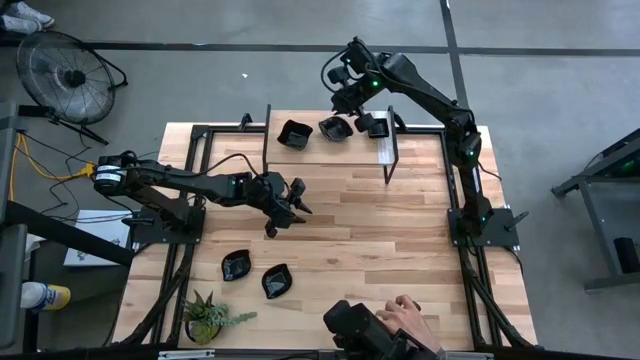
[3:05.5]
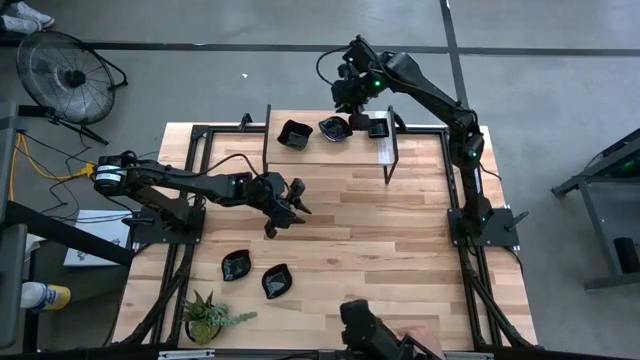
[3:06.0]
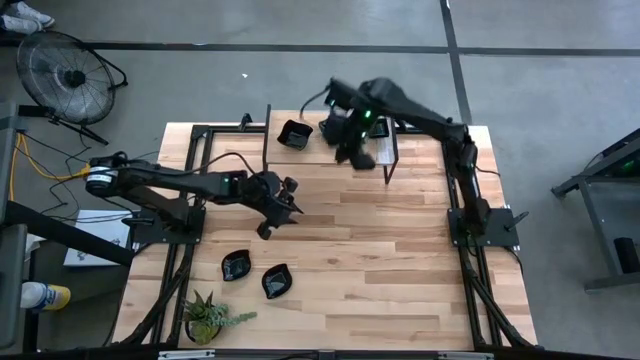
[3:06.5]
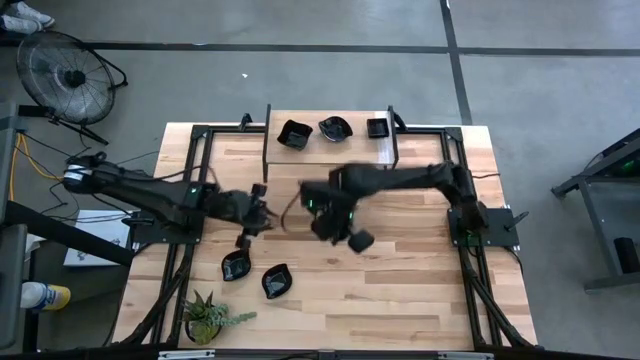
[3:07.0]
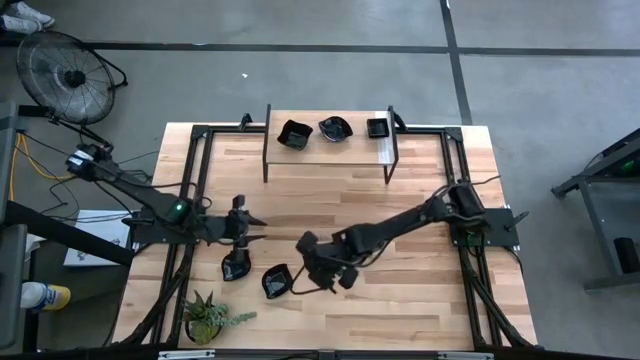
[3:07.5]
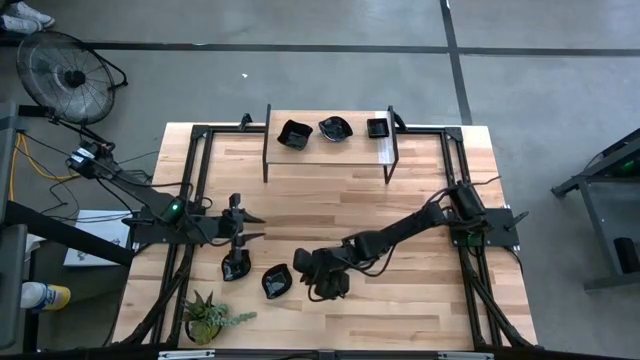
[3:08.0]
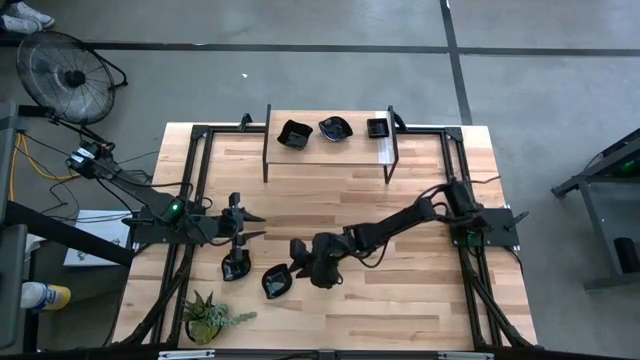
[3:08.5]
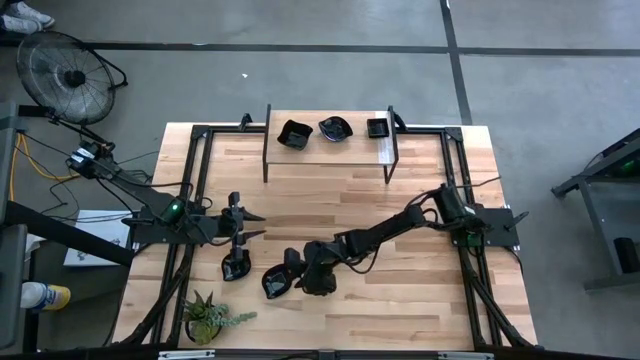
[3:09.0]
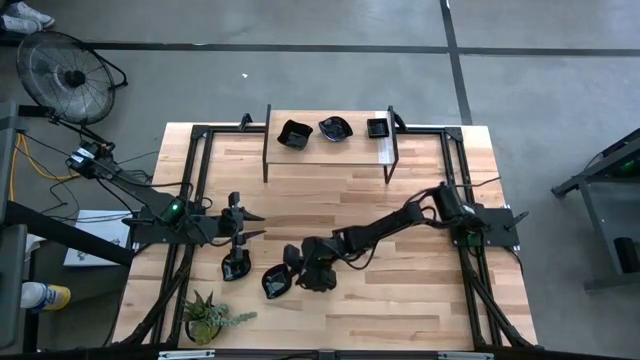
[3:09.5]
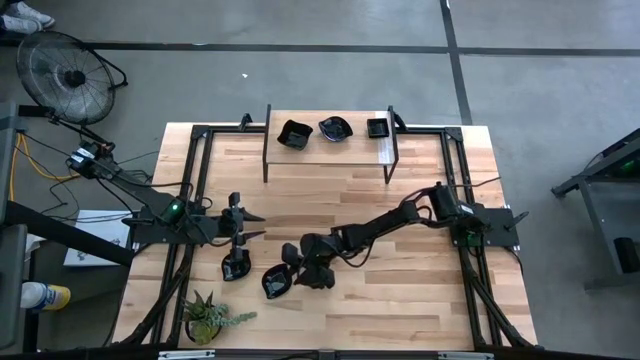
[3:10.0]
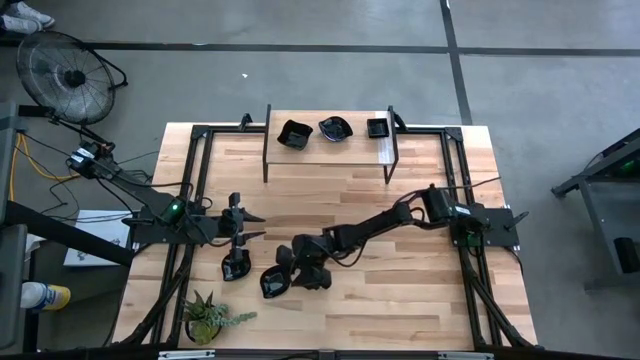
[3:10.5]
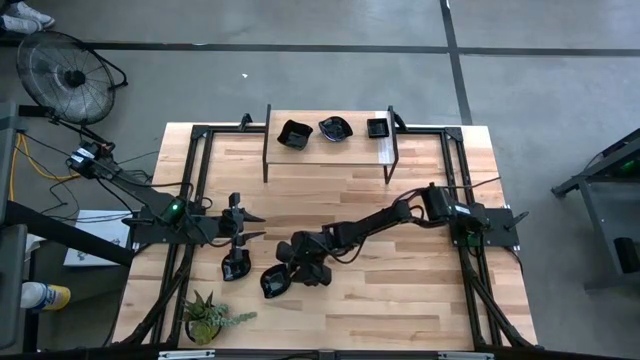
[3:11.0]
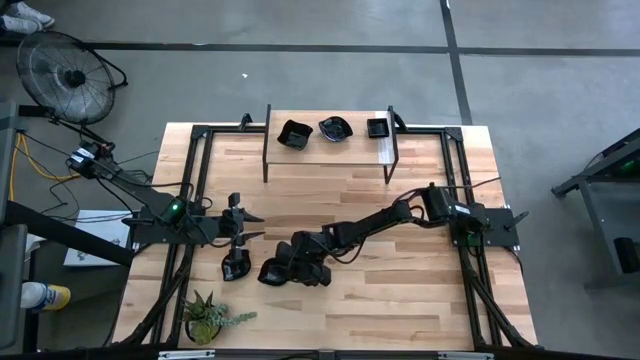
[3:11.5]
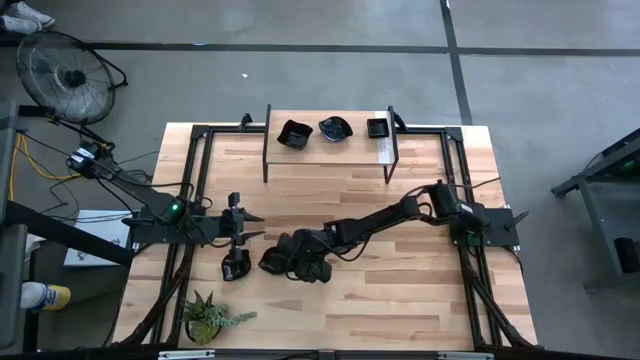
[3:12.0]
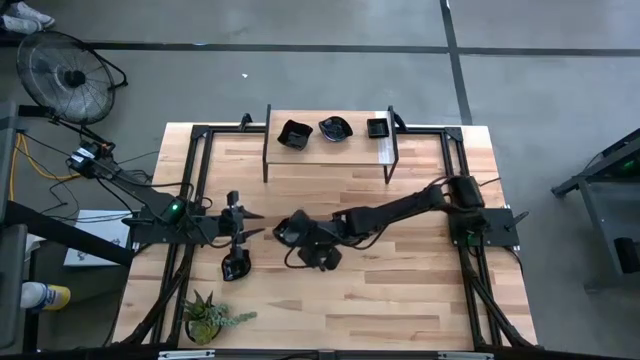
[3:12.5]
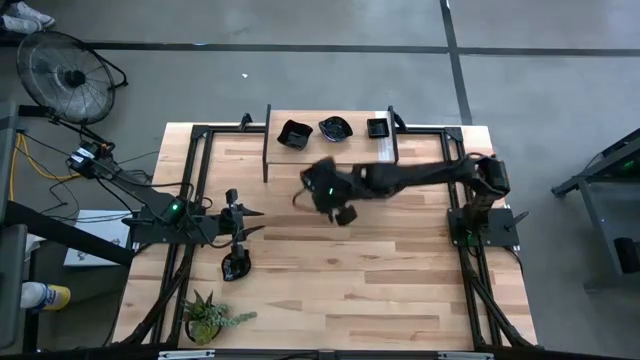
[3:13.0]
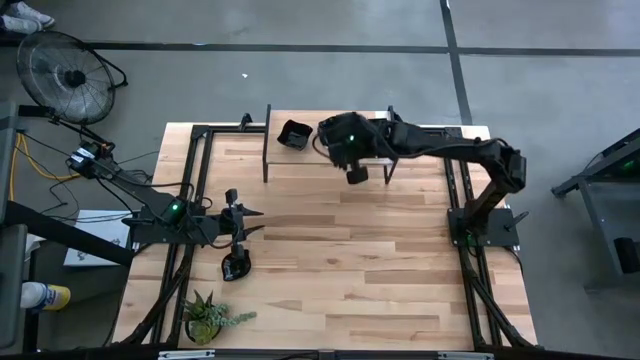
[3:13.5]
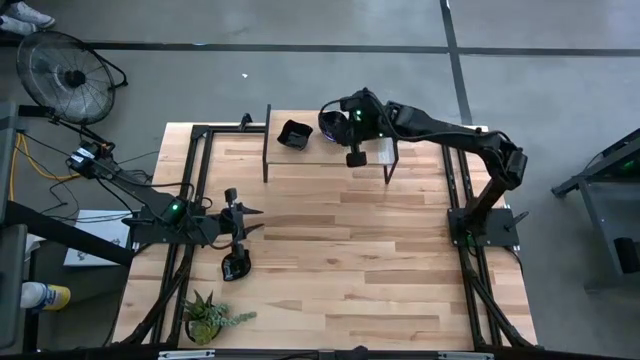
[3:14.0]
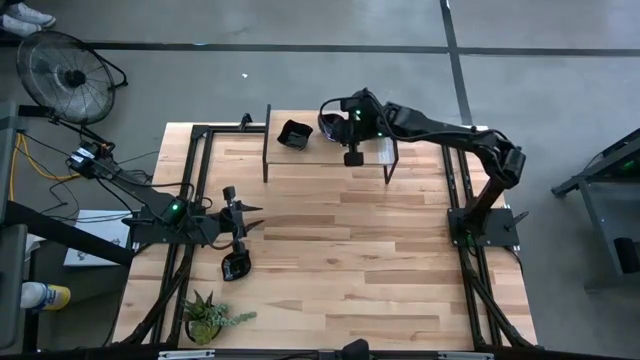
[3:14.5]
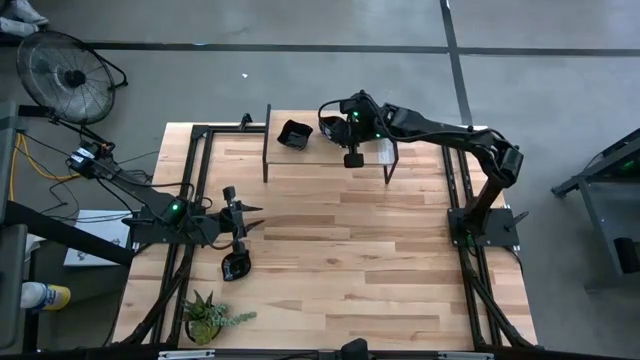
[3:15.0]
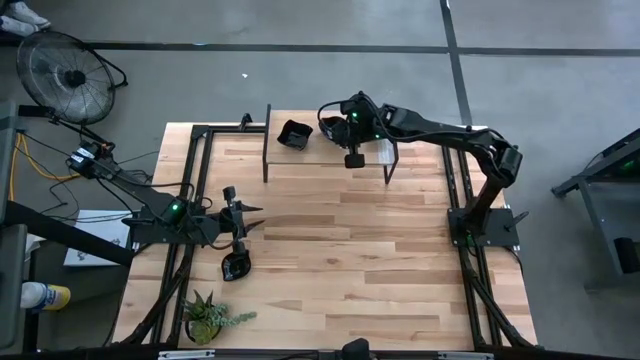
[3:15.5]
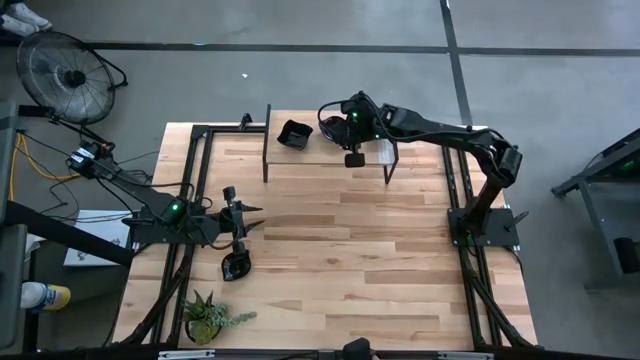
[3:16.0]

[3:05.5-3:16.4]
Task: Pick & Place Mini shaped plates
Stack the black leaf shaped plate on top of the black leaf shaped plate on the shelf

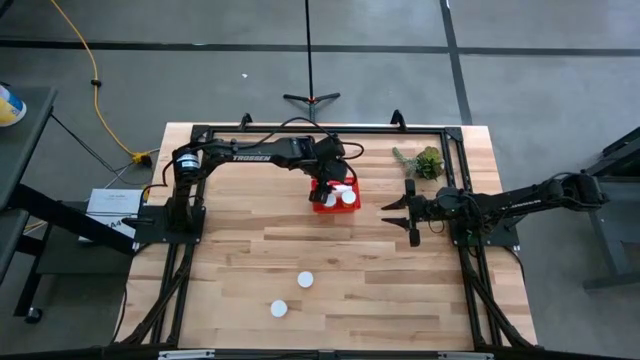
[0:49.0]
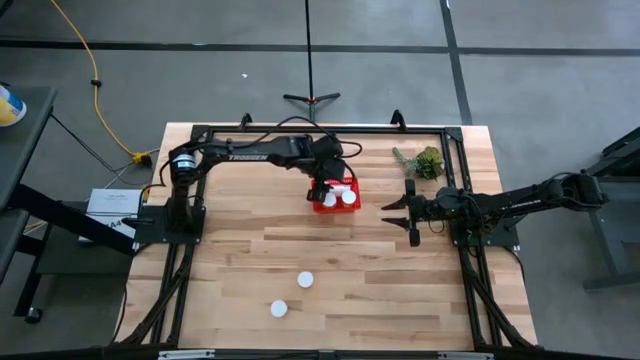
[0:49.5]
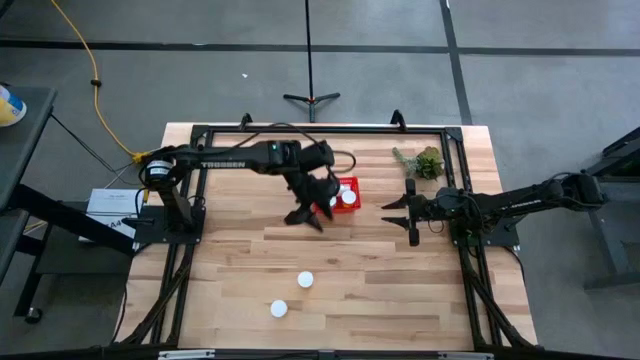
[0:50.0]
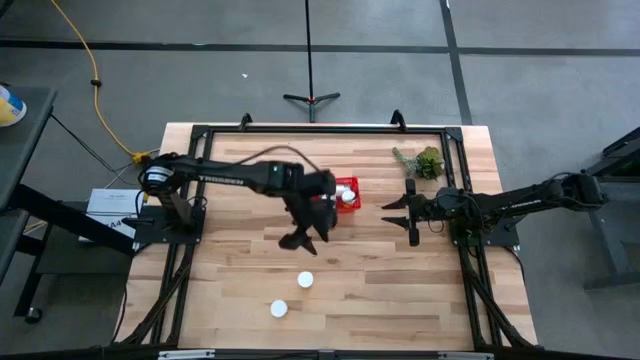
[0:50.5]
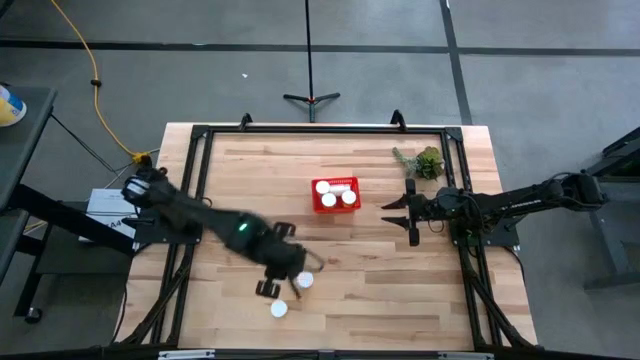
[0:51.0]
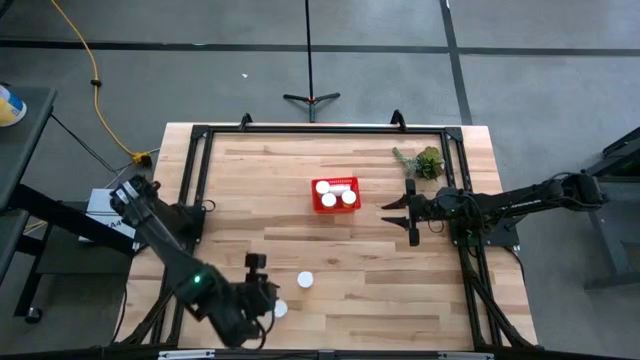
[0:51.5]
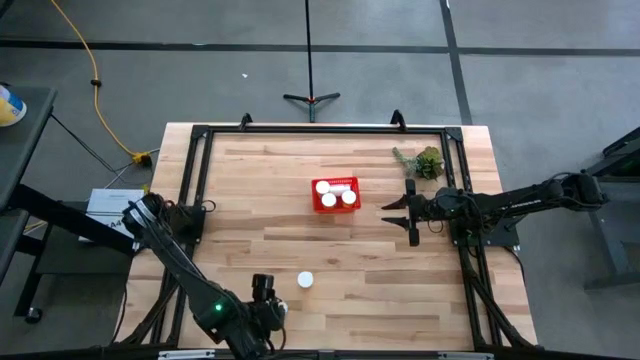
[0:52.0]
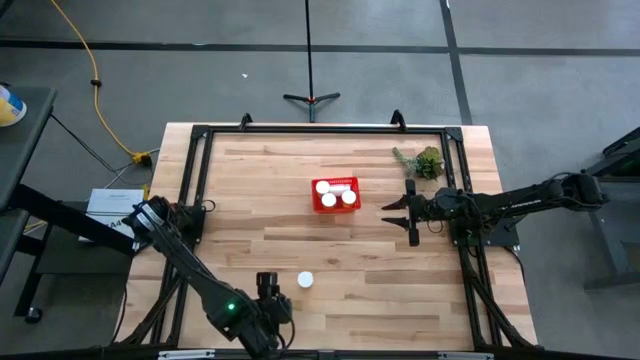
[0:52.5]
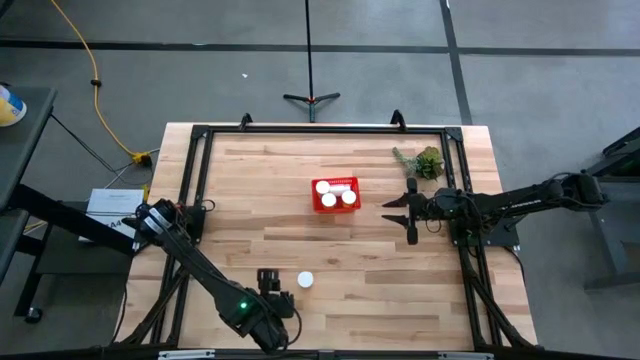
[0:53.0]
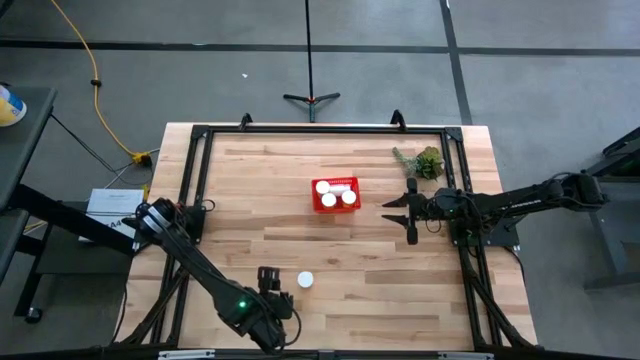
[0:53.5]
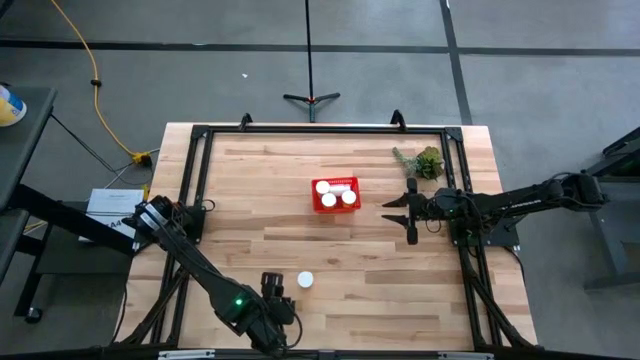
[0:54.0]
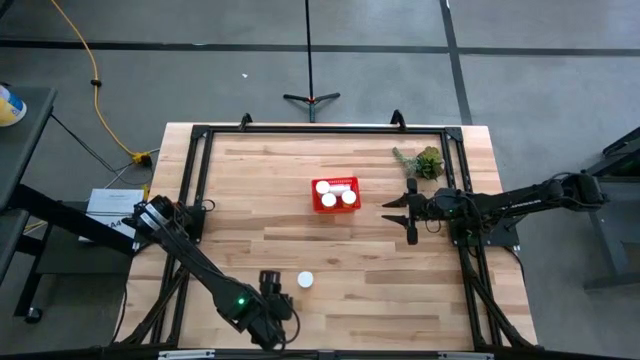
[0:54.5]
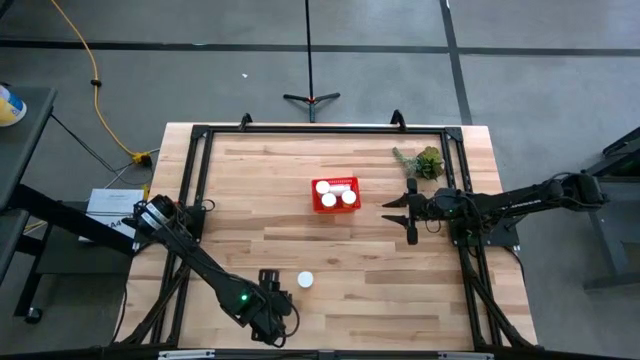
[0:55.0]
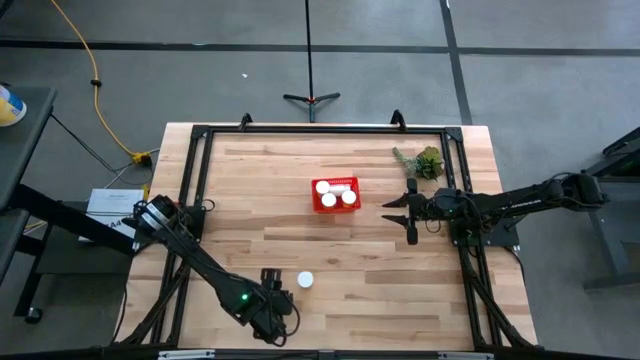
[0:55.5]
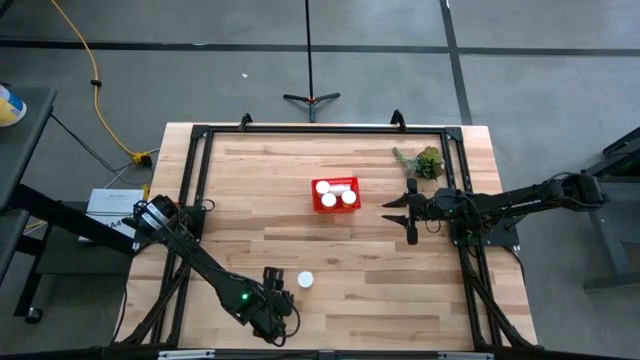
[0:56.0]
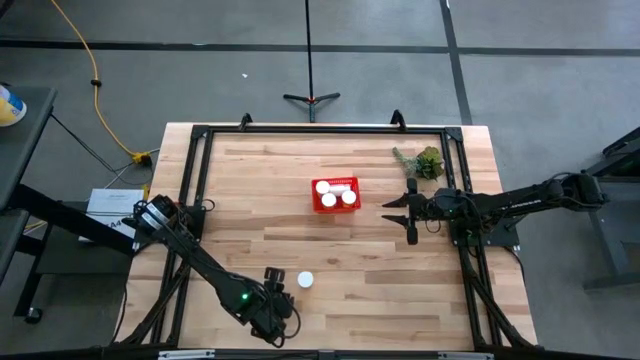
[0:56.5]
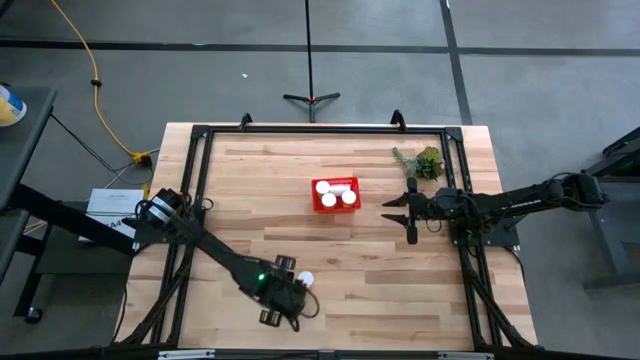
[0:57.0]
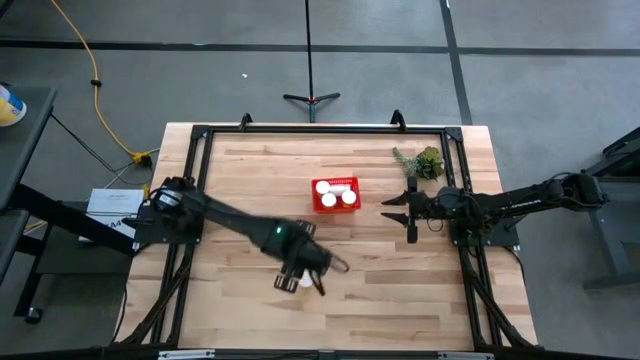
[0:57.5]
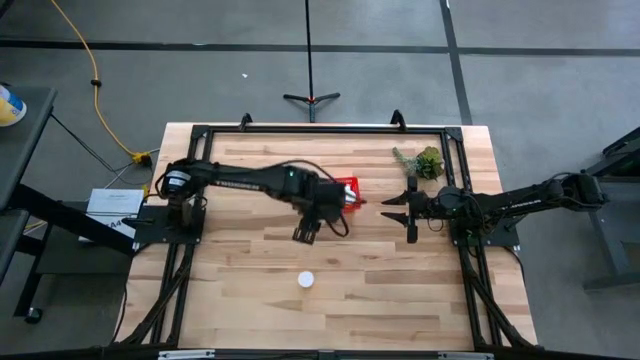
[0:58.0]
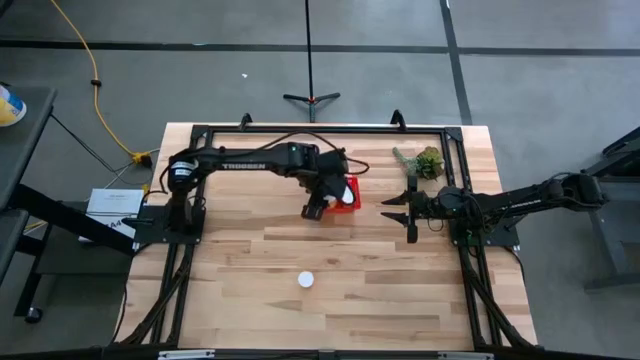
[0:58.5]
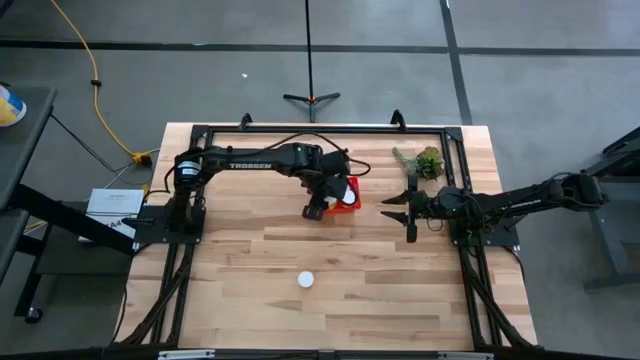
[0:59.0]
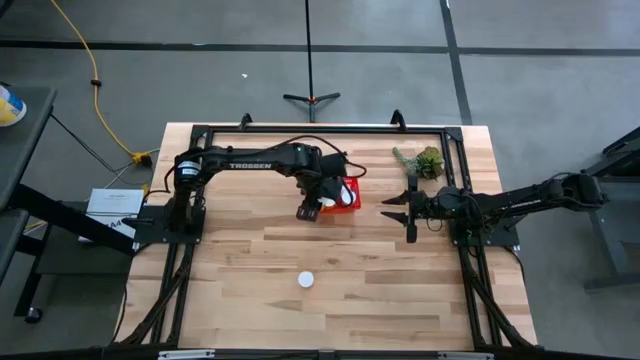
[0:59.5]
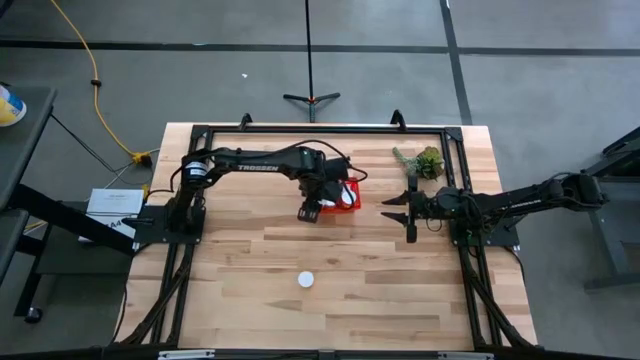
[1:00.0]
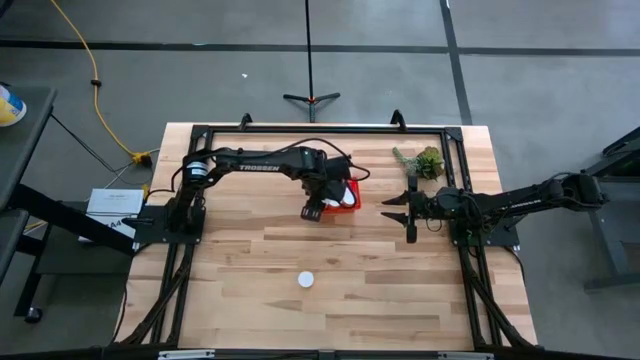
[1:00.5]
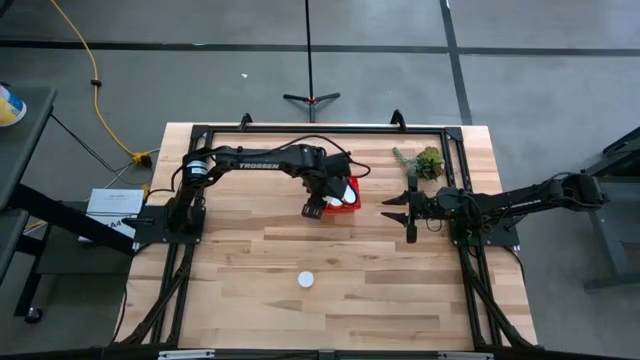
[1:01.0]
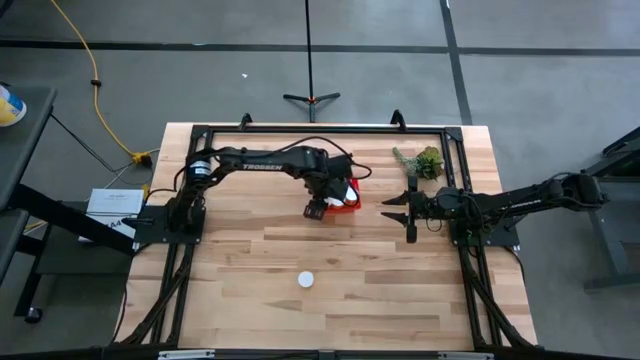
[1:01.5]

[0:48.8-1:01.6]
Task: Pick and place pill bottles into a basket
Put the orange pill bottle into the red bin
